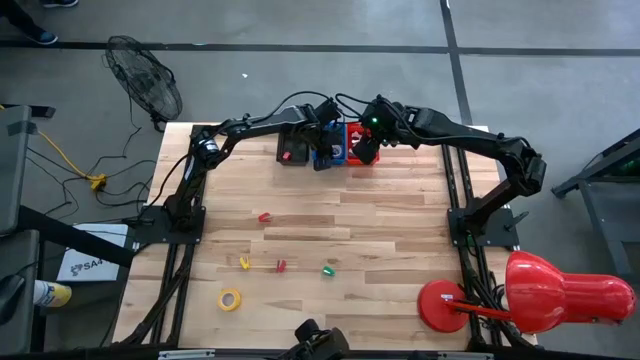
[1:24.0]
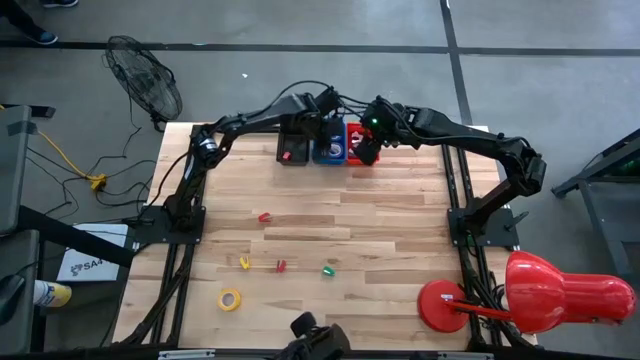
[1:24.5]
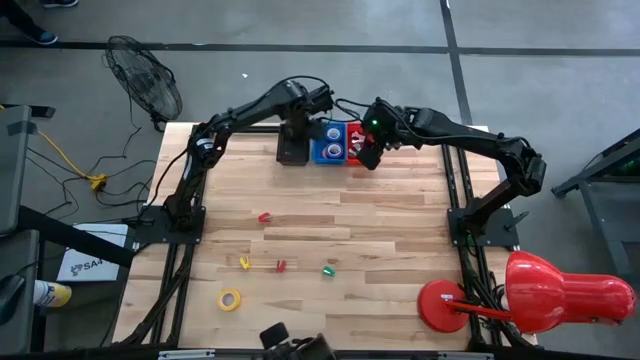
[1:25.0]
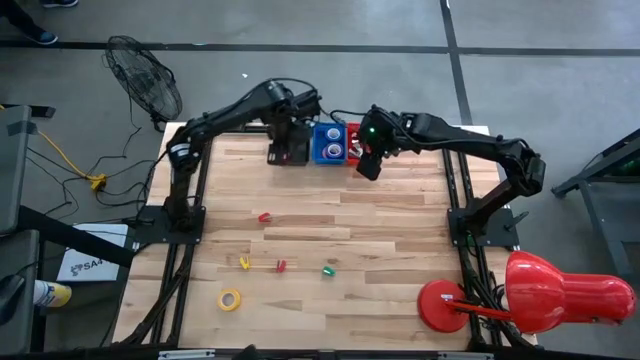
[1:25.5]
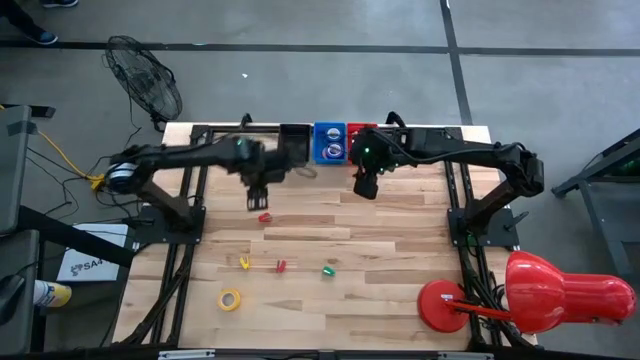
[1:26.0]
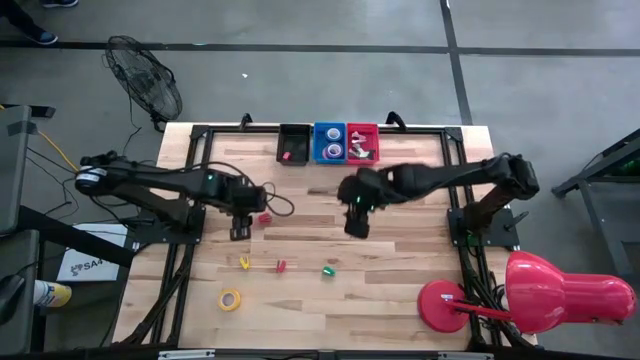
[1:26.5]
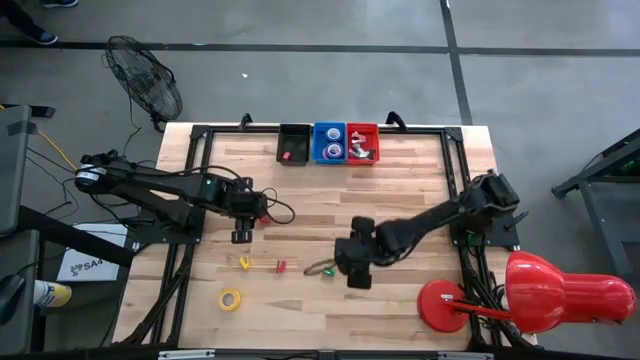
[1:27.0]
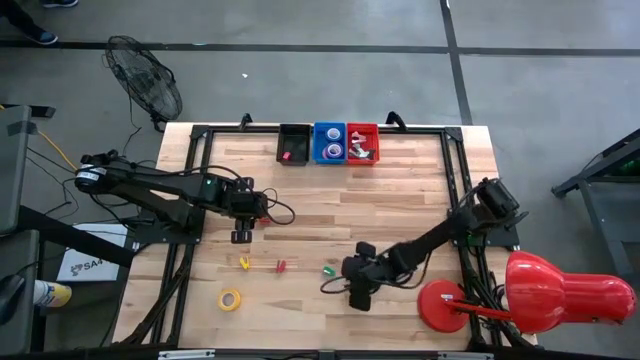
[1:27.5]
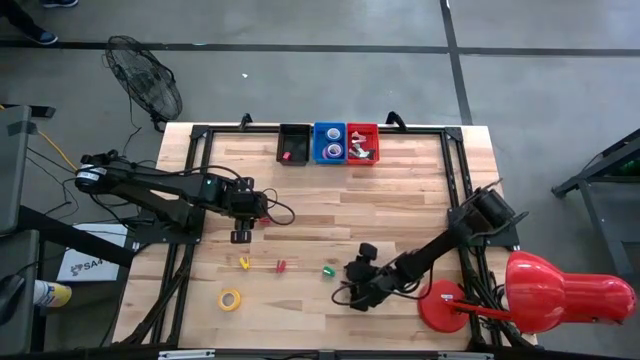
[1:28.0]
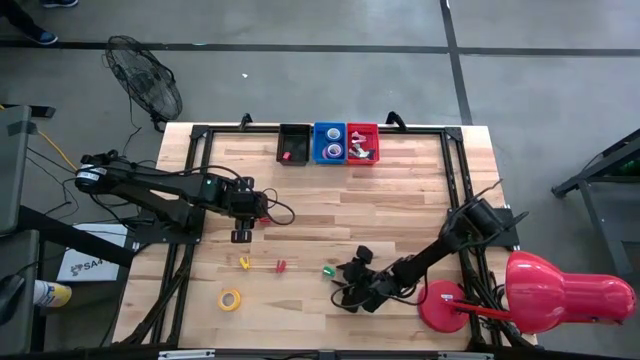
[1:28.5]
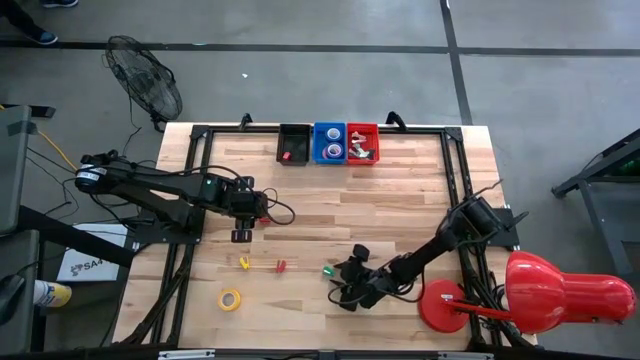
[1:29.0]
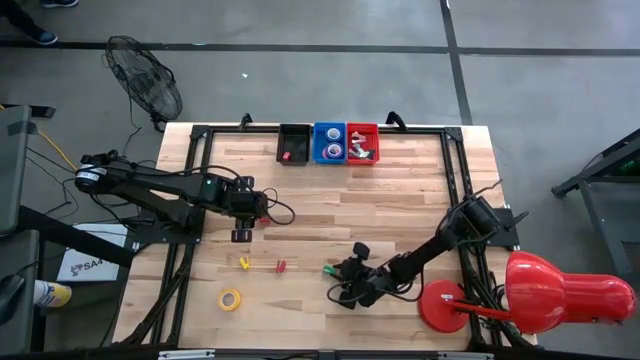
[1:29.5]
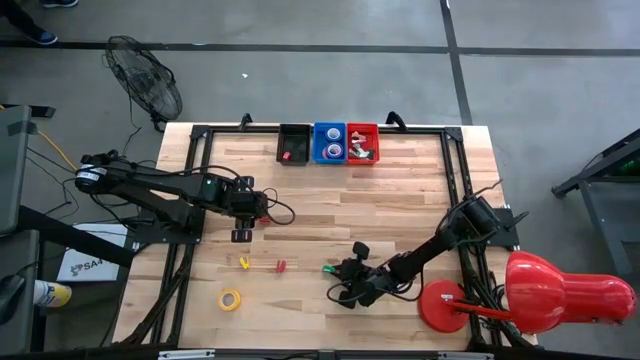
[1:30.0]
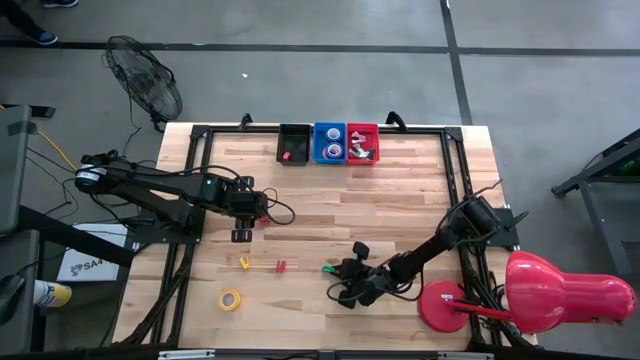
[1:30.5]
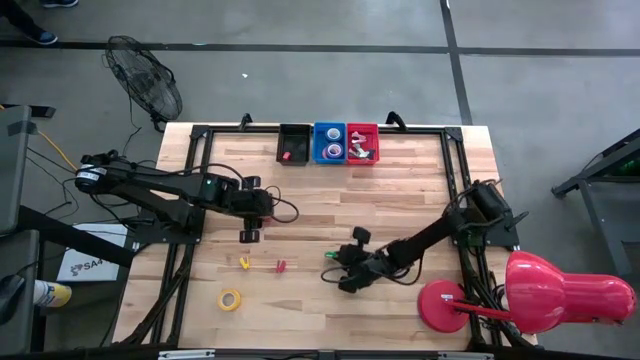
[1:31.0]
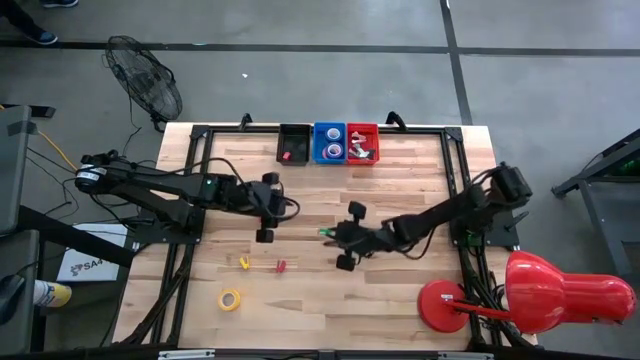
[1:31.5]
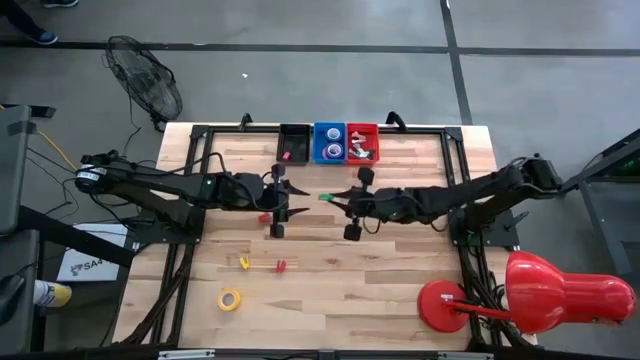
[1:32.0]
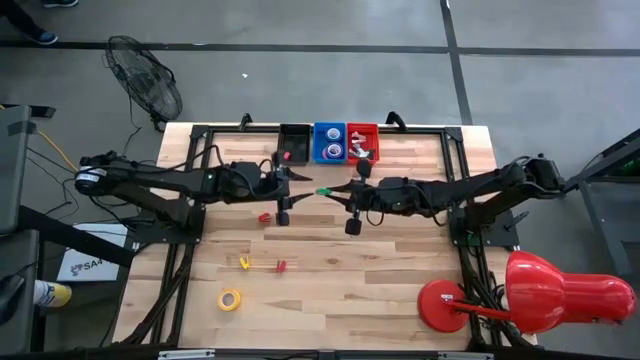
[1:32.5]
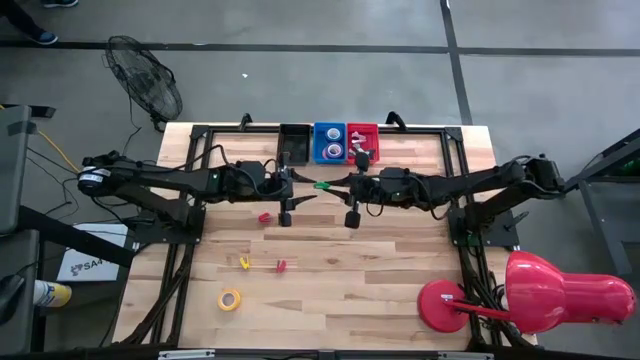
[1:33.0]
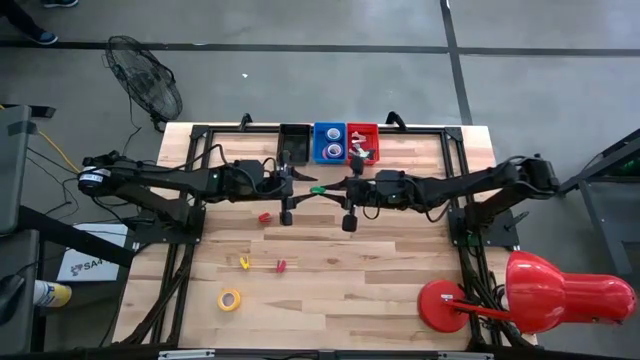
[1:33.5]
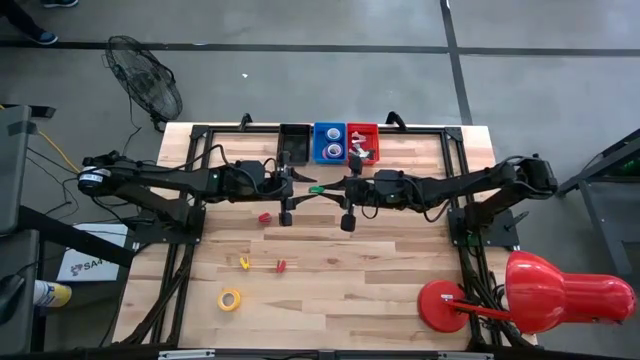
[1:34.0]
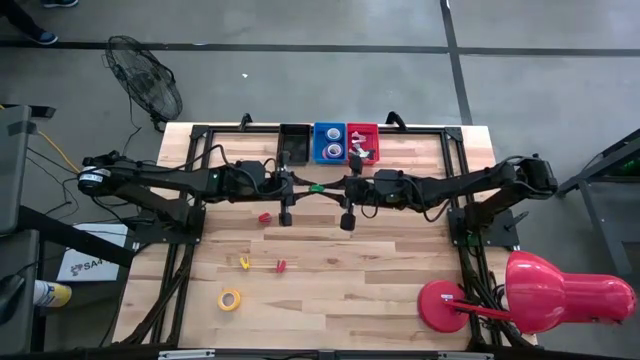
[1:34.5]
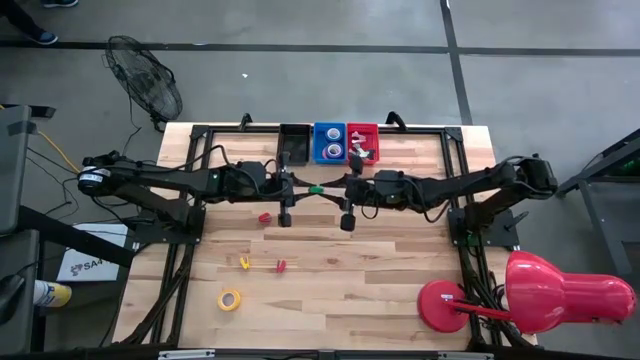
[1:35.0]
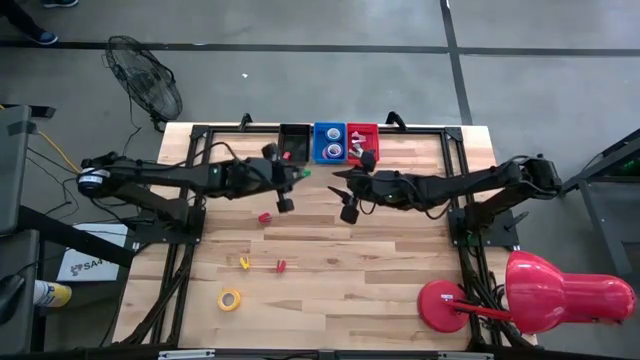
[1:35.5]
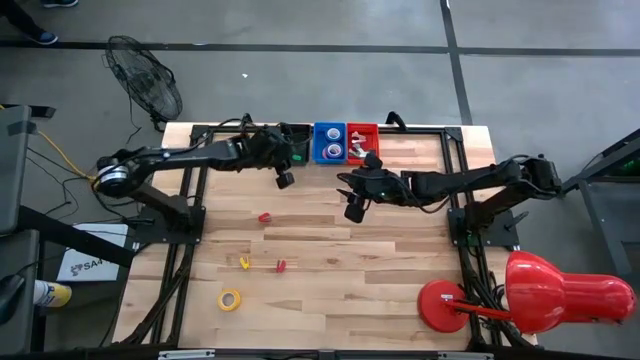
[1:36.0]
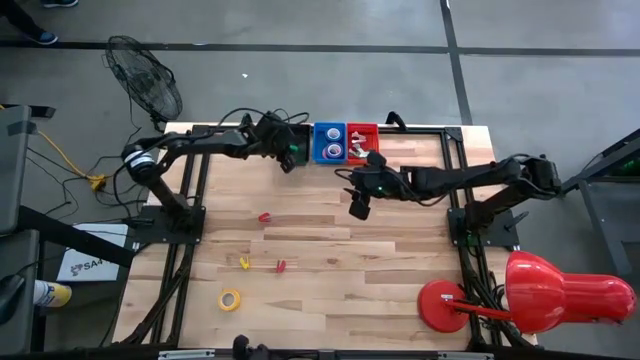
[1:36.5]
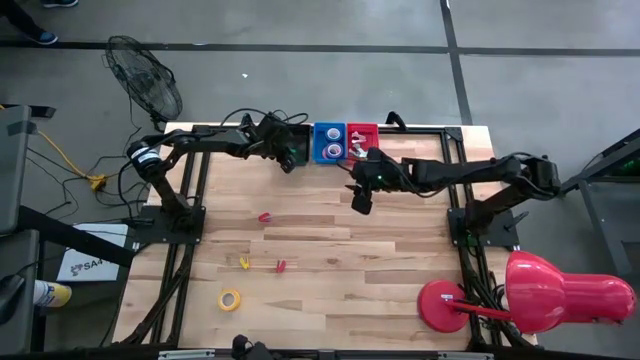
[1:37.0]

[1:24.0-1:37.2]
Task: Pick and place Stapler, Stapler remover, tape
Put the green stapler into the black bin
